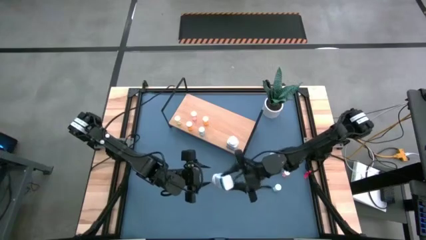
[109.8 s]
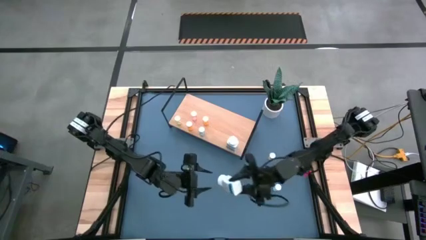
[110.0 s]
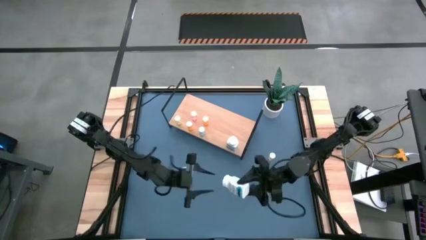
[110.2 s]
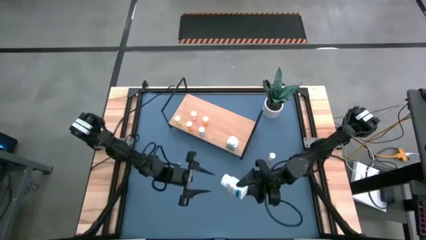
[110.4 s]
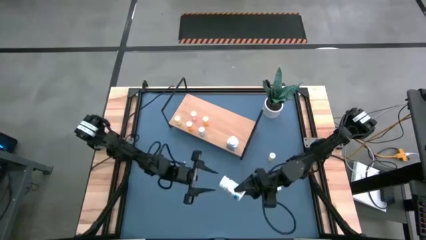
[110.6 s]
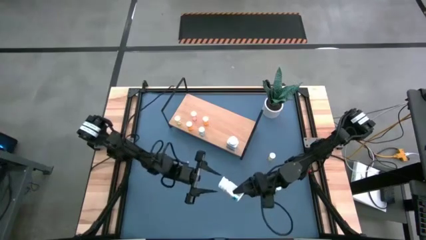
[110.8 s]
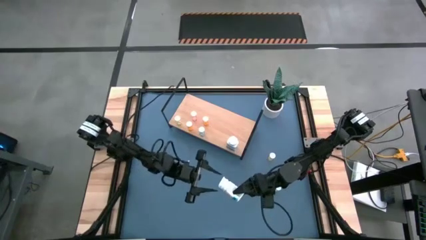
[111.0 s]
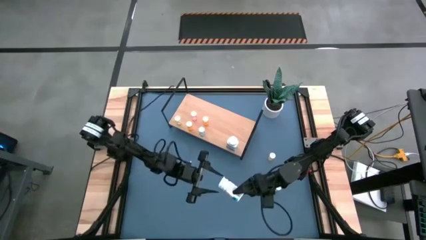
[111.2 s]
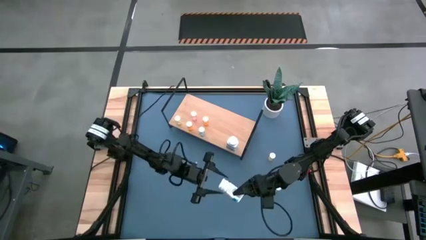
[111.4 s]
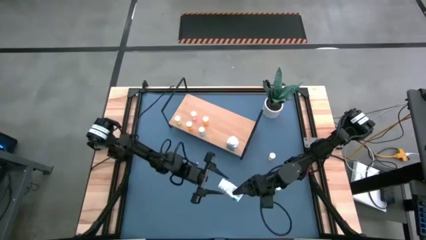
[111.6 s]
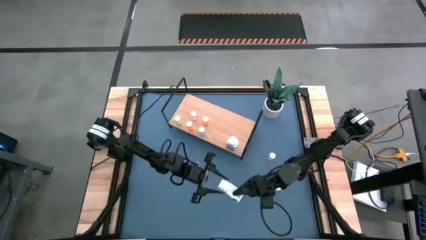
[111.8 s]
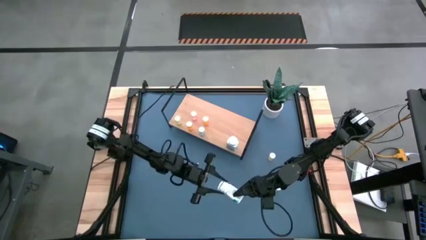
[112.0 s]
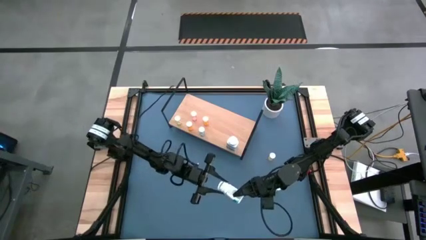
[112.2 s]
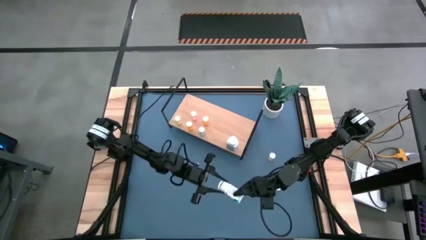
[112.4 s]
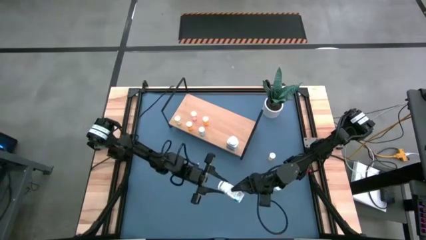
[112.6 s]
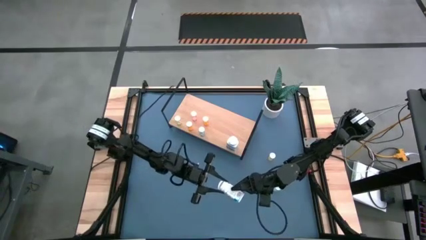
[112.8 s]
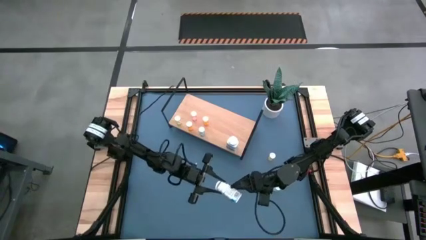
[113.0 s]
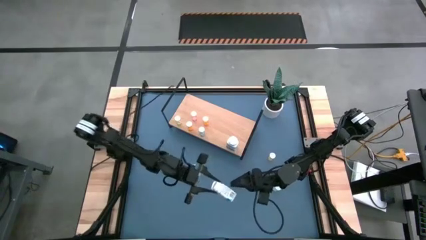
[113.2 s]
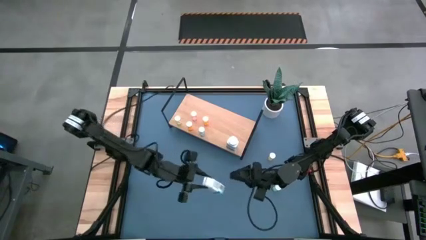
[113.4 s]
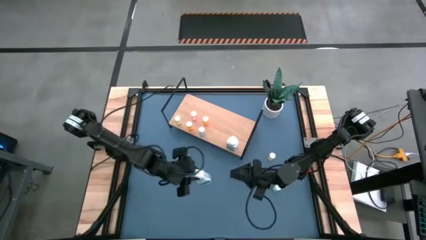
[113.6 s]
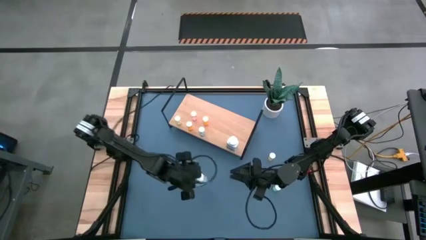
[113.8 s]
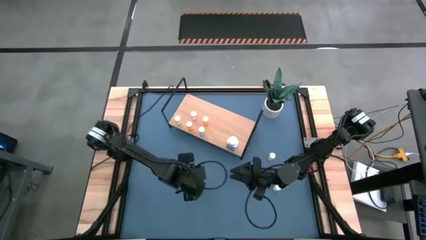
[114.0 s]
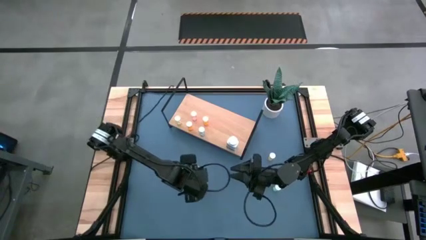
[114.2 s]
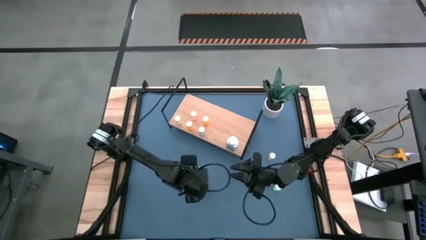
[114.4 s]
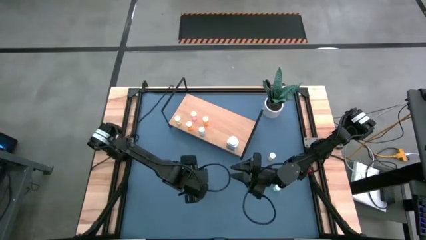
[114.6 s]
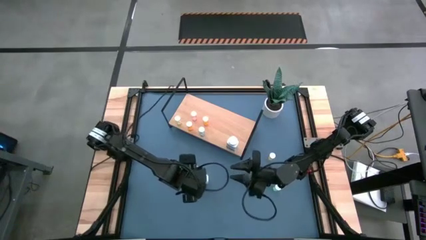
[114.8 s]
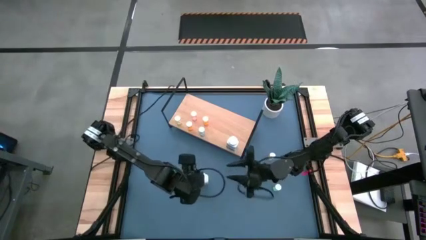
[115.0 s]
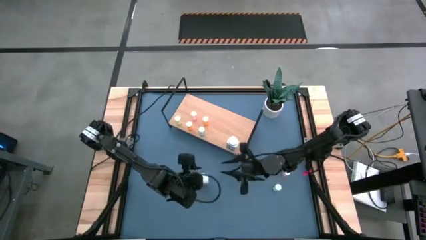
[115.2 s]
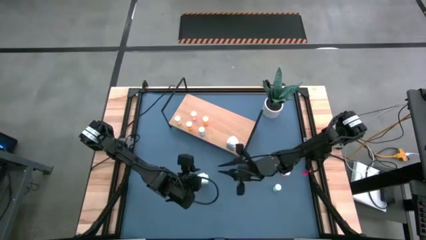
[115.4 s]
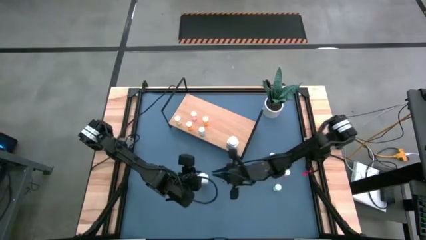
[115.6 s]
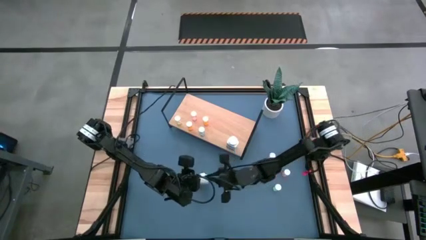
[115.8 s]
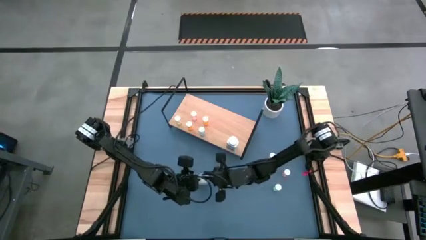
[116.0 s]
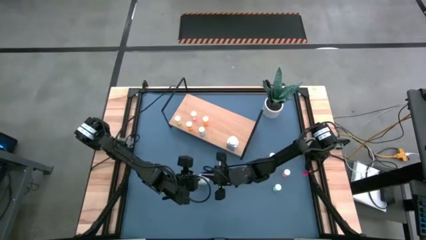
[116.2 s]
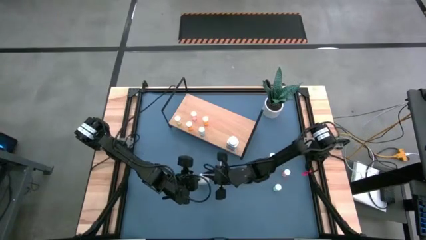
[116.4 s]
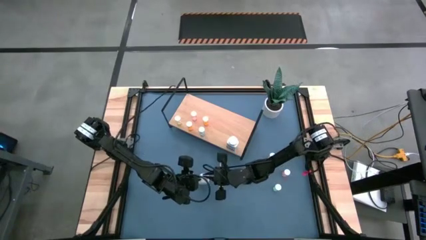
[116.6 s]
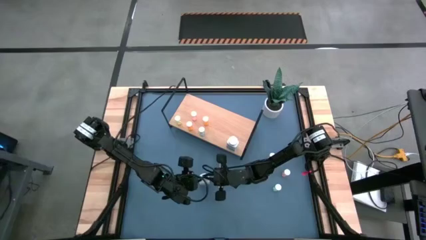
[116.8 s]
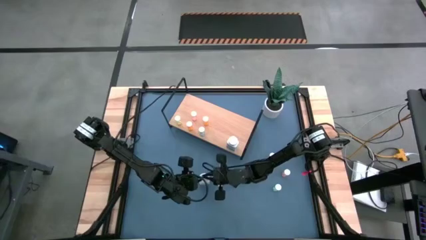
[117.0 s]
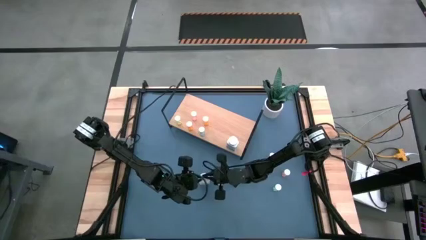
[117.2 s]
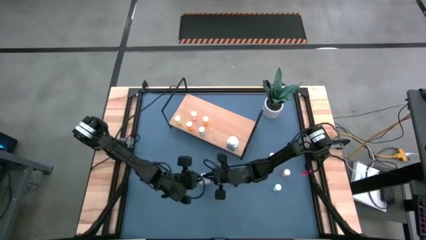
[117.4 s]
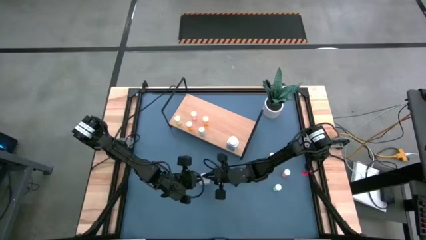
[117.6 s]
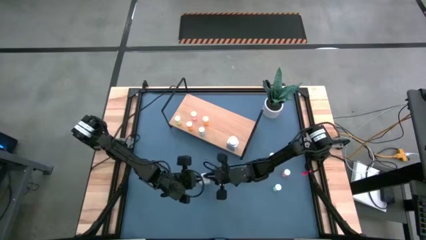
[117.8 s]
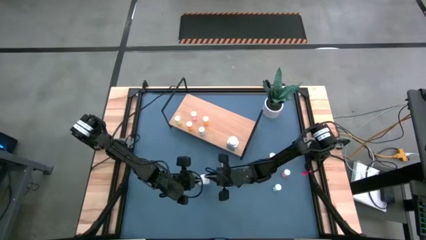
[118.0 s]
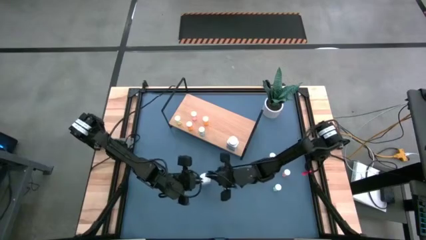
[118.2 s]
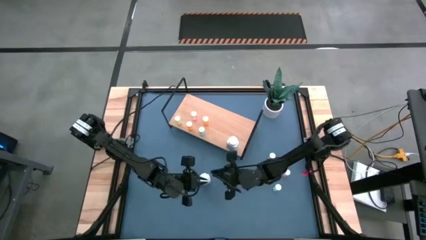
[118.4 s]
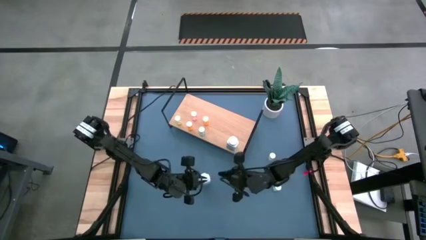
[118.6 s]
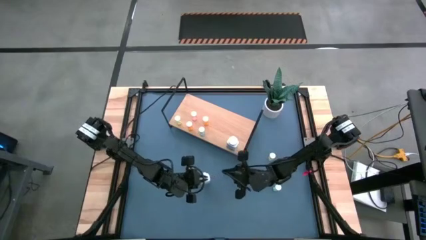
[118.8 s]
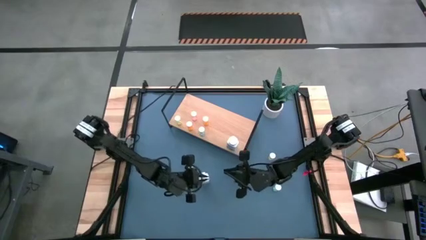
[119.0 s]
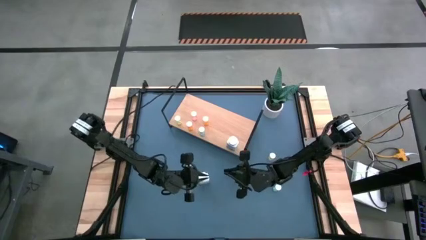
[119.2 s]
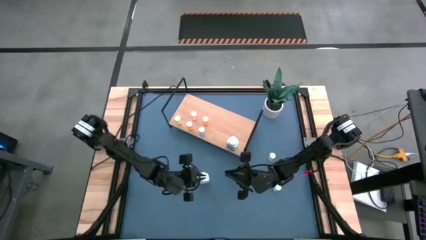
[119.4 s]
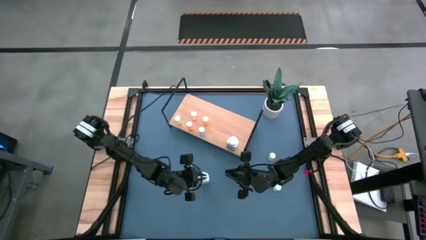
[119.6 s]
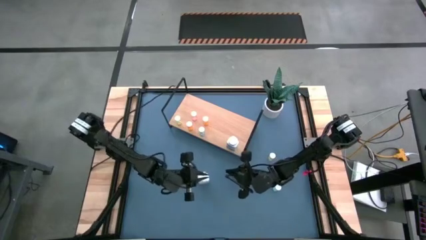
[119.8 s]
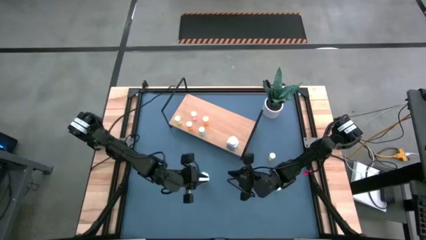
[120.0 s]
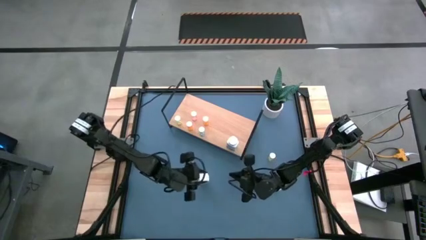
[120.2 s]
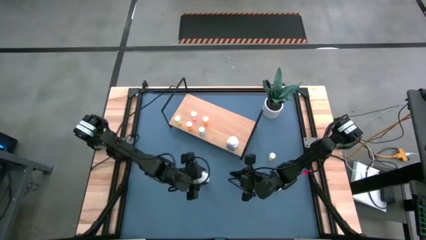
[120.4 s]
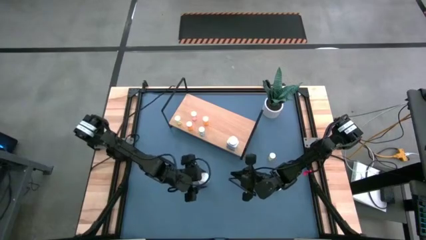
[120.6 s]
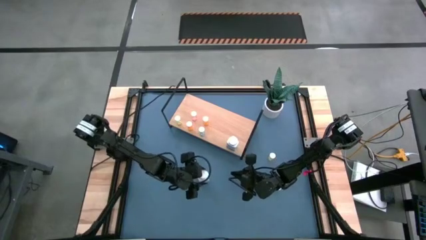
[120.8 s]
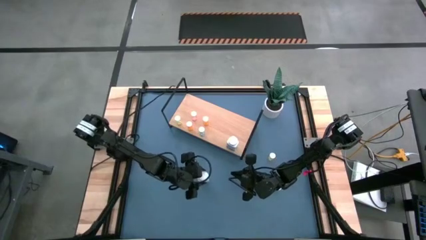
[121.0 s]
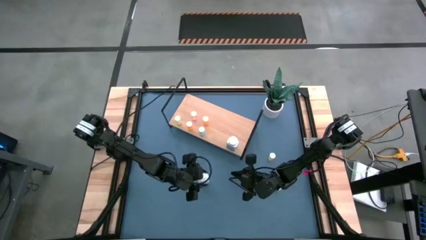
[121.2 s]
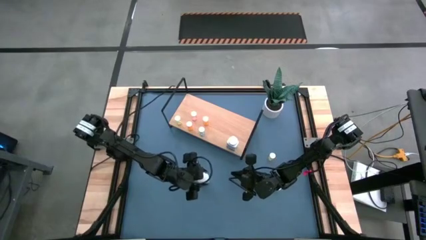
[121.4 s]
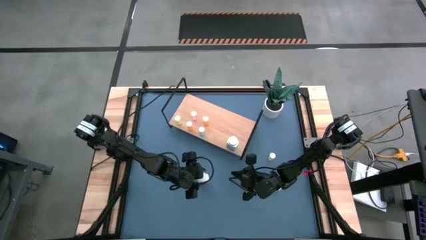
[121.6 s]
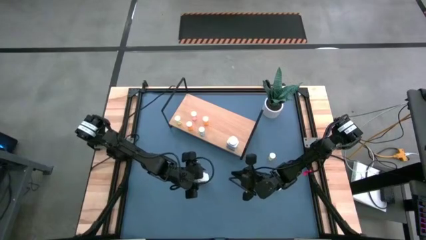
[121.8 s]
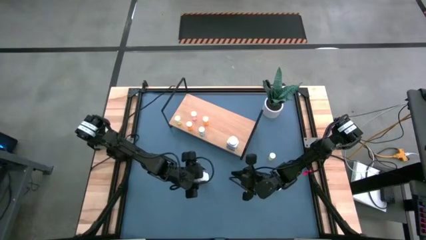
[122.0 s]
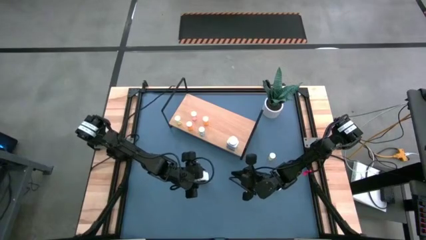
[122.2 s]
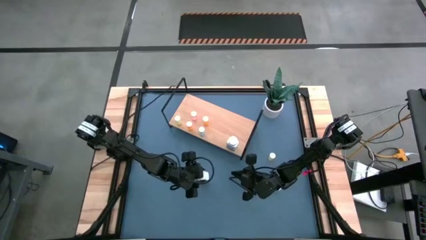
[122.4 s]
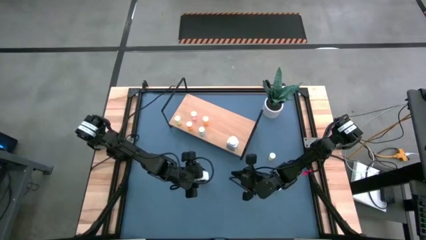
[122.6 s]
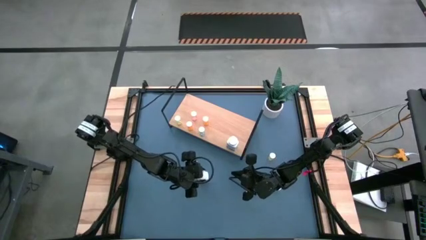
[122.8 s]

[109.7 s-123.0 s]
Task: Pick and place medicine bottles onto shelf by color
Put the white pill bottle on the shelf

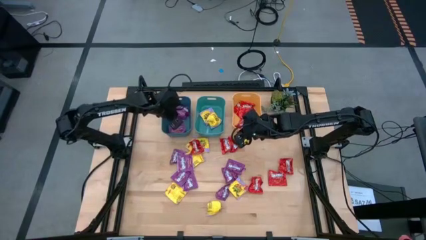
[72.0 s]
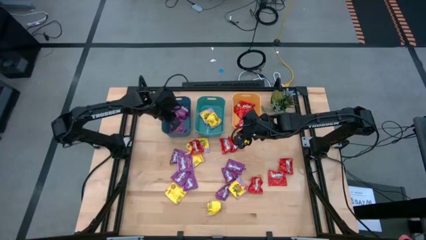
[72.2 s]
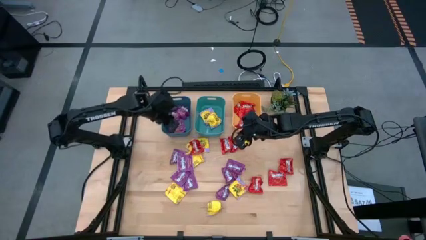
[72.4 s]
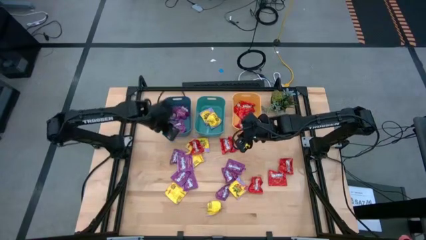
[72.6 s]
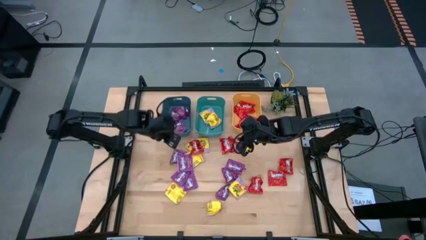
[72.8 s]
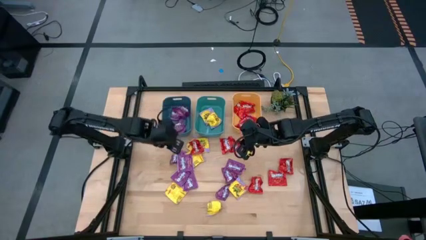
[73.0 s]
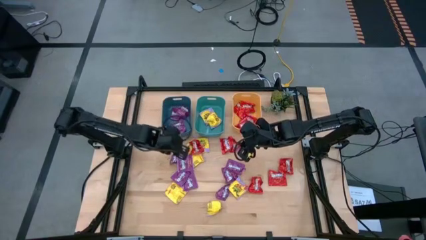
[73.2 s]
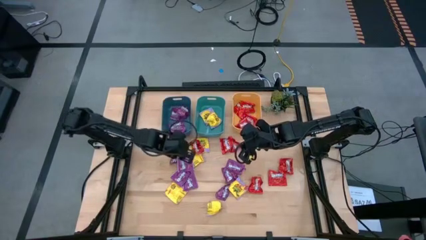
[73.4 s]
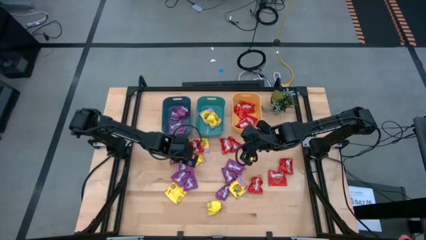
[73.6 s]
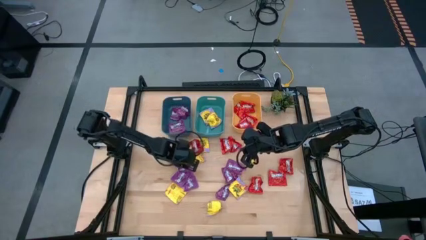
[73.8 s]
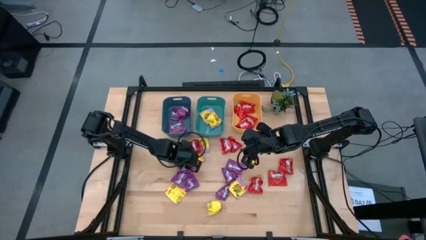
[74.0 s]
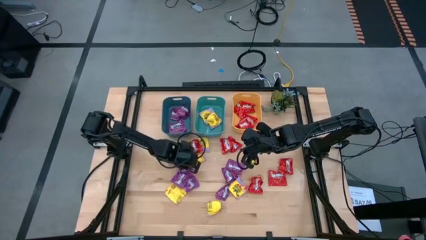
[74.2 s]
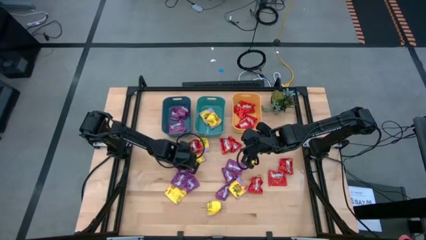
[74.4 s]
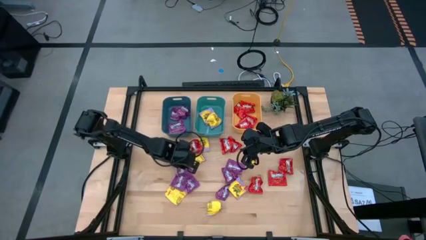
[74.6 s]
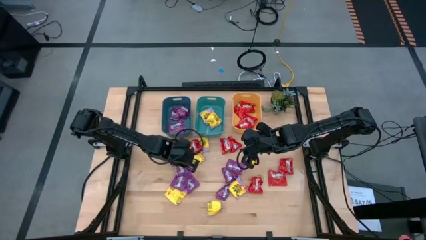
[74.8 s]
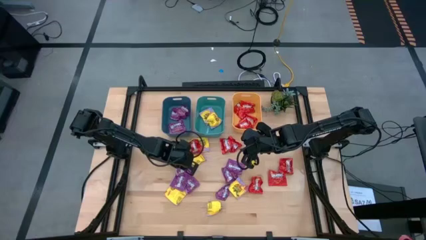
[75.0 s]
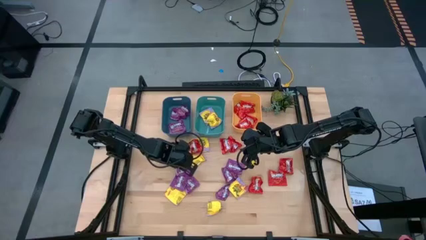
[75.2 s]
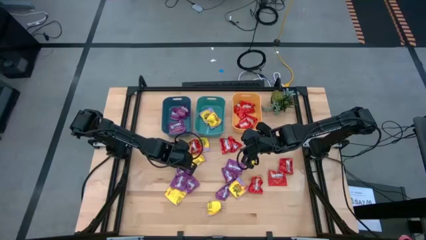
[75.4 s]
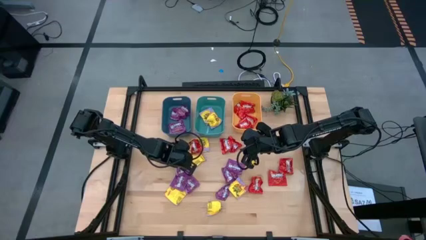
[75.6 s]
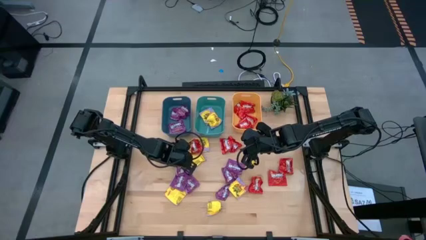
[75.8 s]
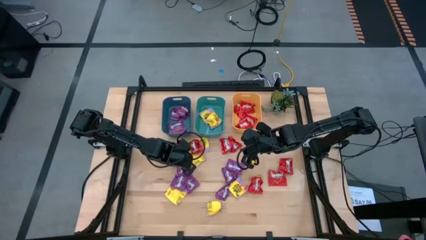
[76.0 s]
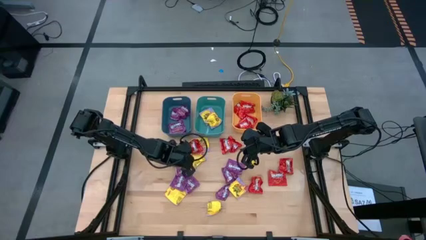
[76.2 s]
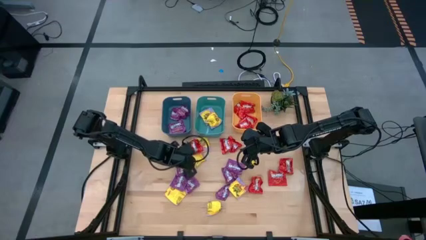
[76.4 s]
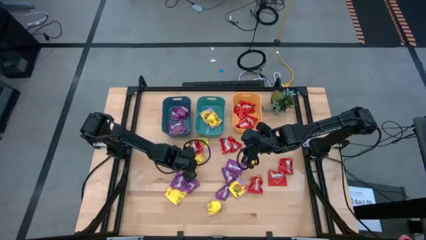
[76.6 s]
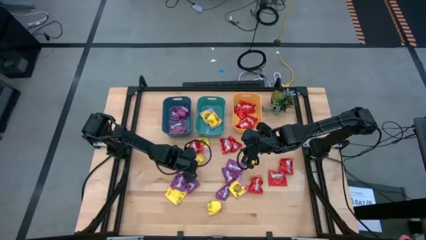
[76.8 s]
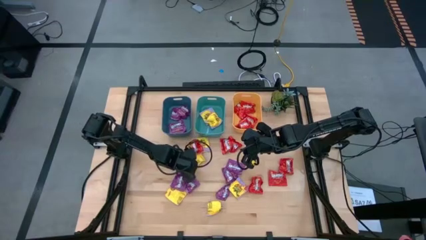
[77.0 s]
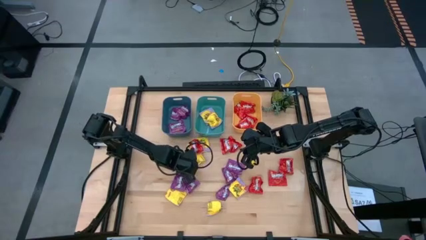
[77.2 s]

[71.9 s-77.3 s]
Task: Sort candy
Put the violet candy into the blue bin
